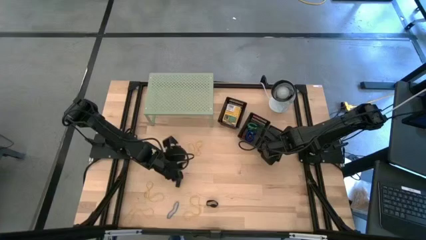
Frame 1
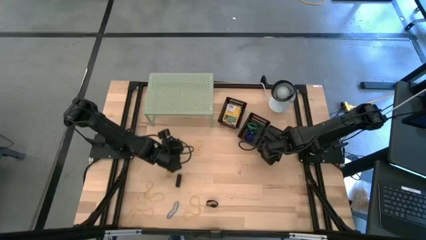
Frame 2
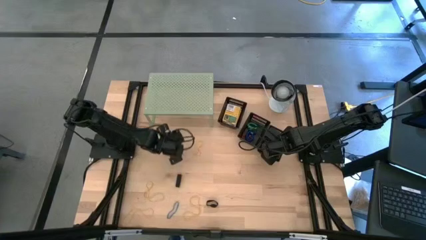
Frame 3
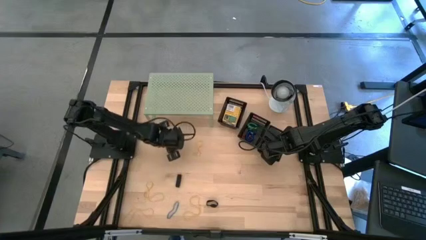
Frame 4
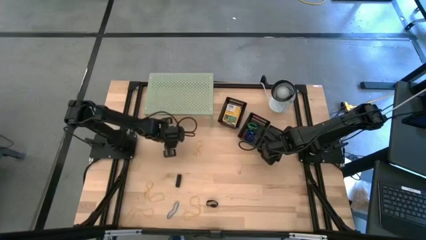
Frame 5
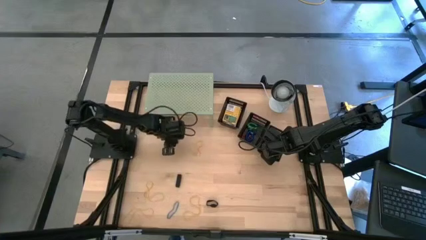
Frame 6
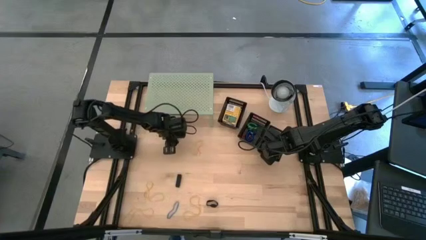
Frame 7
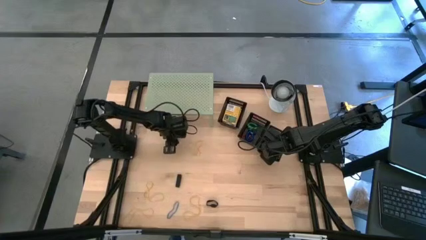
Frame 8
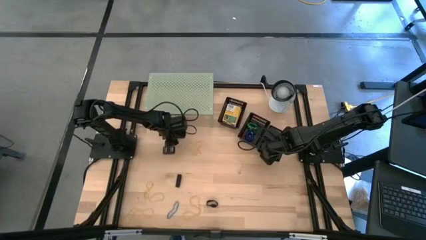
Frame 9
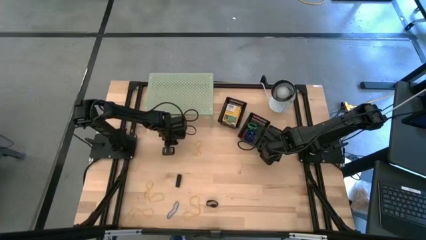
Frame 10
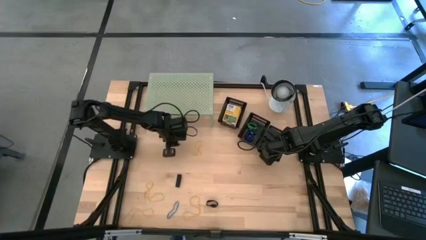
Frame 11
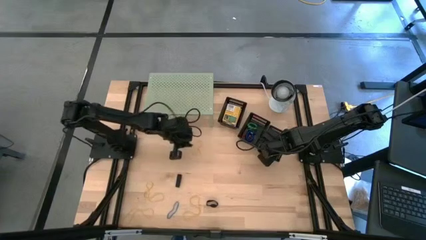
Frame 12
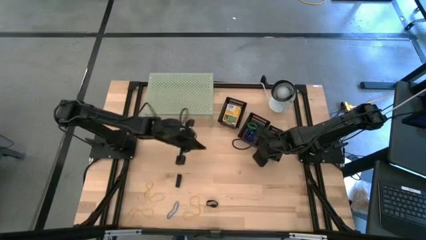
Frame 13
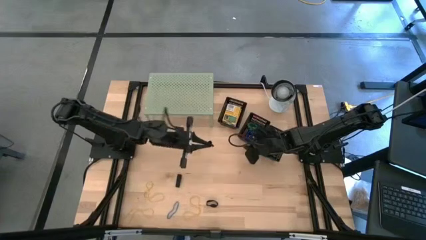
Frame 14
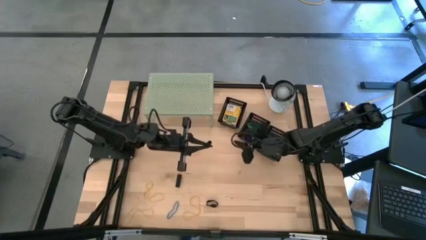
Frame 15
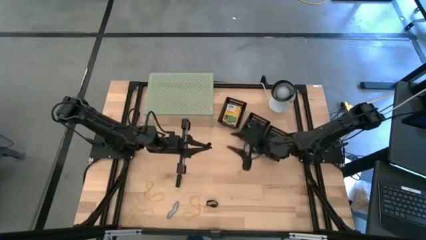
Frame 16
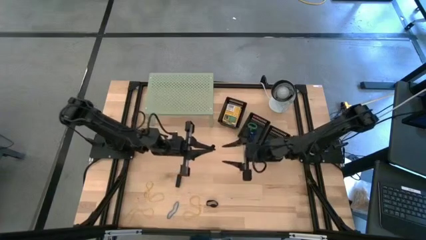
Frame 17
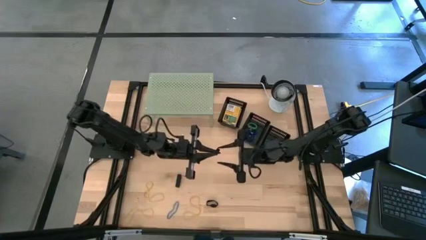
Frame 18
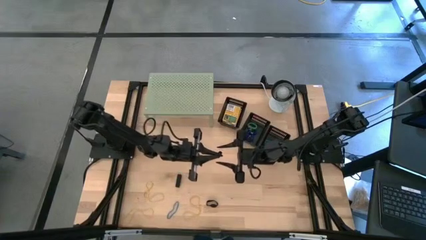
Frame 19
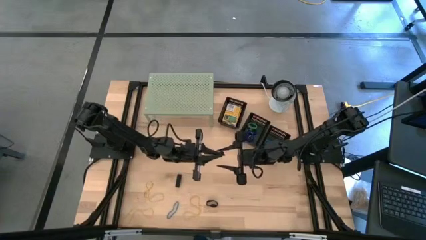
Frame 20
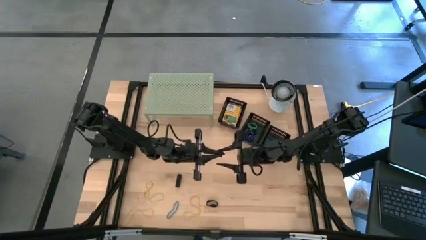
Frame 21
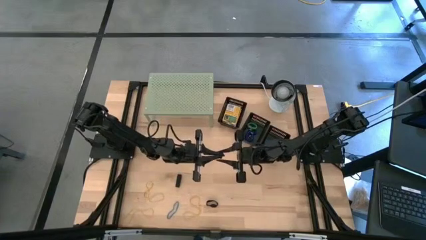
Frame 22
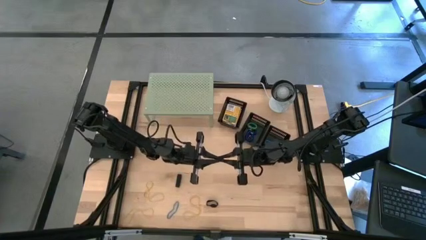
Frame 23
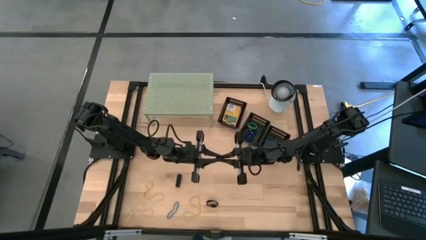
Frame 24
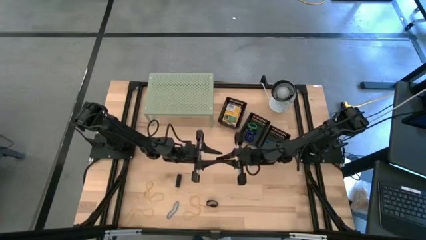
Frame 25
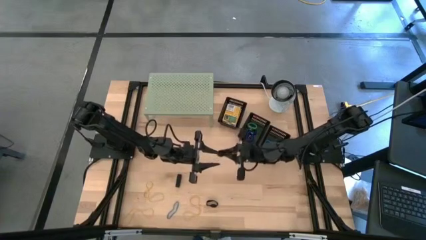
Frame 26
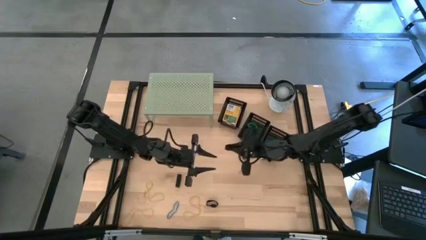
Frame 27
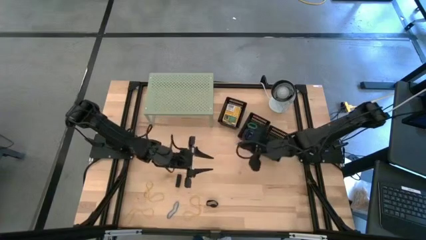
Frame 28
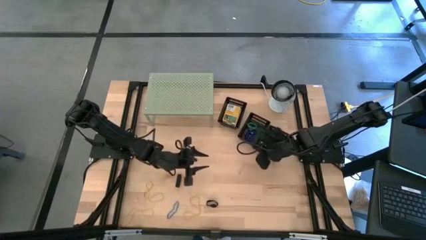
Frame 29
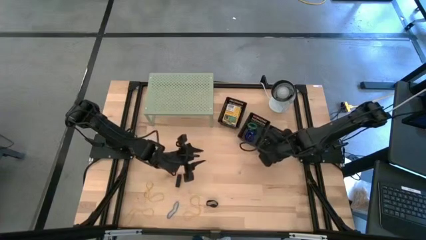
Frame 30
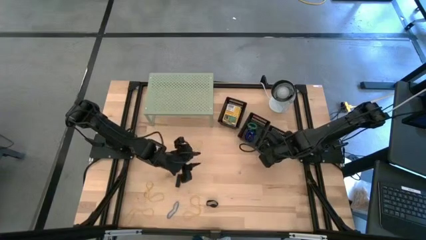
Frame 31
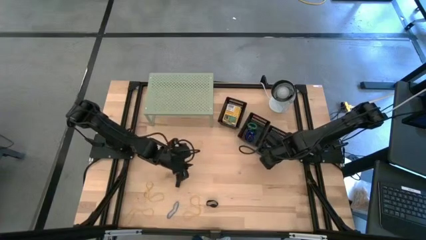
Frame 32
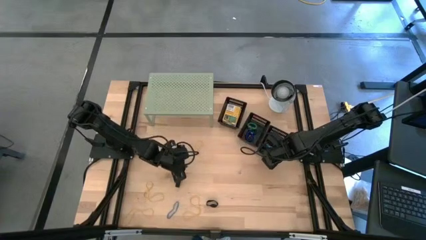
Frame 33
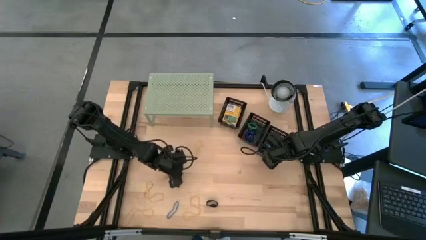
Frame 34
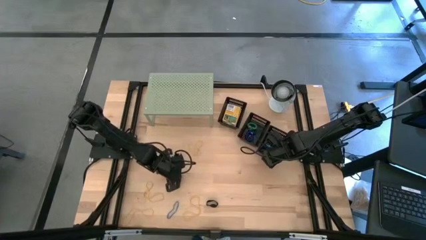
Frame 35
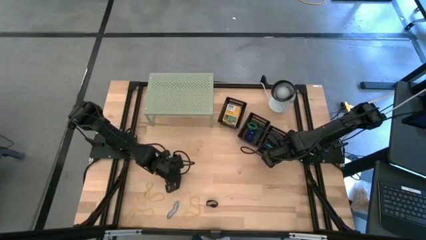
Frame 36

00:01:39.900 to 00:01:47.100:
Task: Pick & Place Office Desk Supplies
Put the black rubber band into the bottom black bin

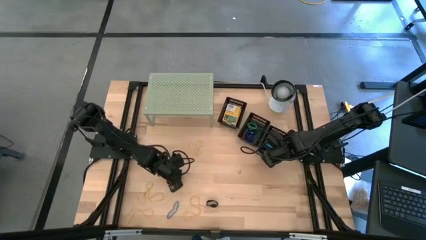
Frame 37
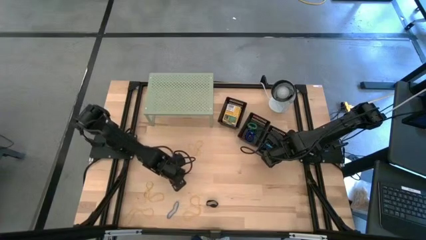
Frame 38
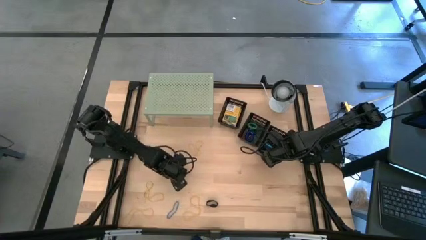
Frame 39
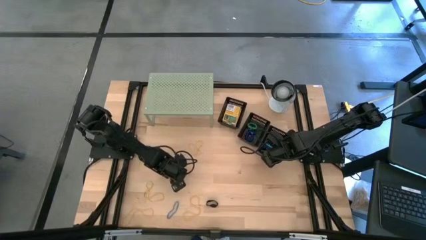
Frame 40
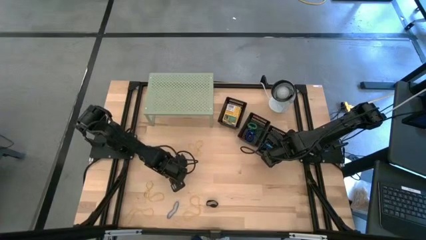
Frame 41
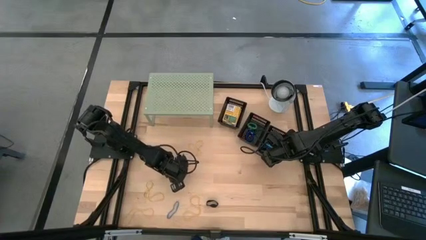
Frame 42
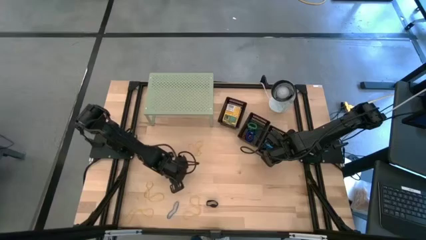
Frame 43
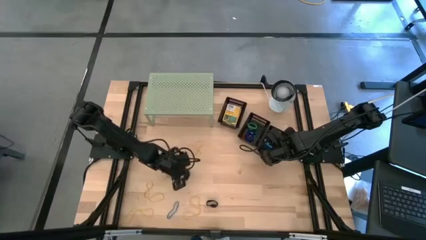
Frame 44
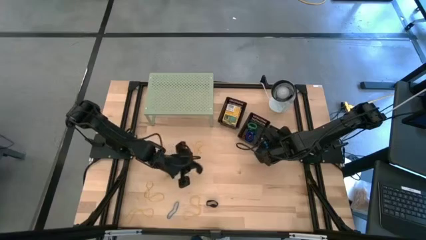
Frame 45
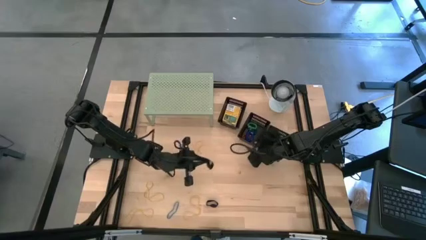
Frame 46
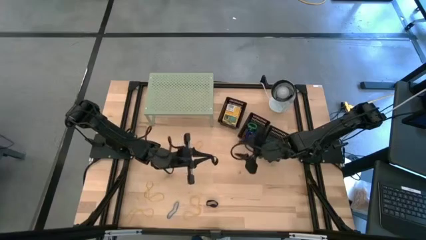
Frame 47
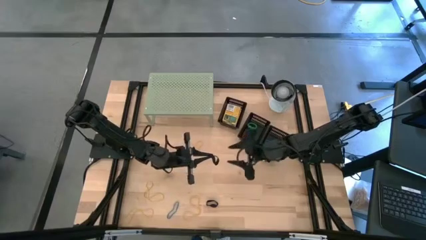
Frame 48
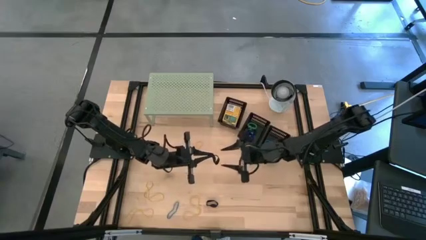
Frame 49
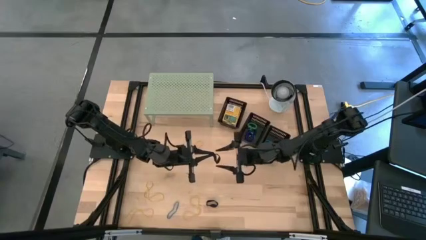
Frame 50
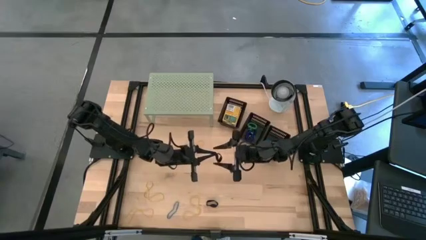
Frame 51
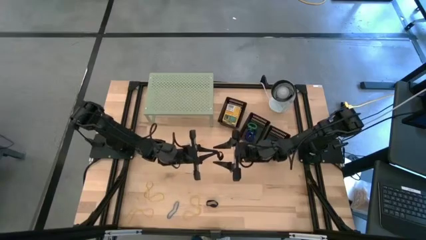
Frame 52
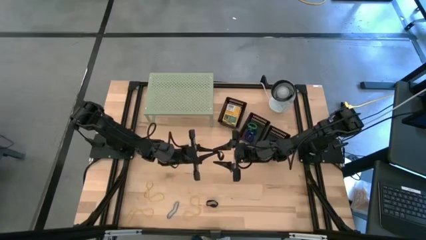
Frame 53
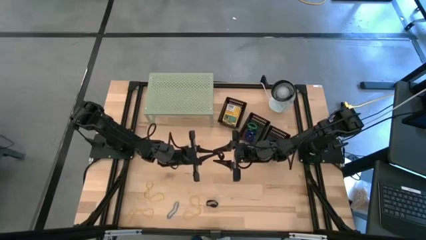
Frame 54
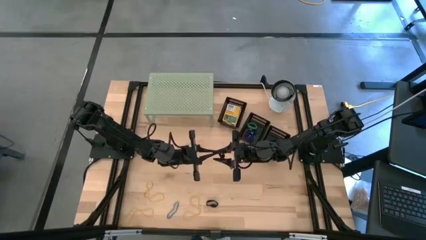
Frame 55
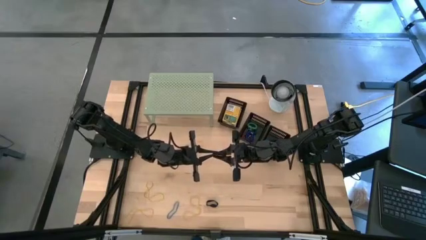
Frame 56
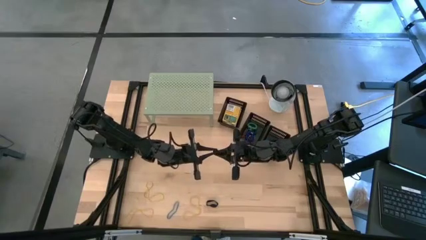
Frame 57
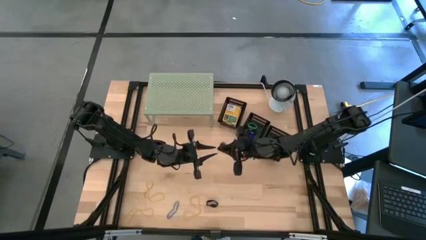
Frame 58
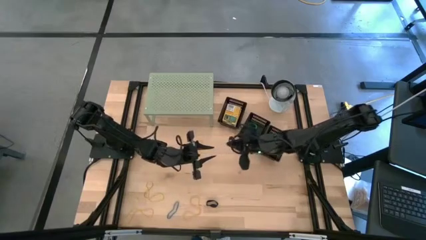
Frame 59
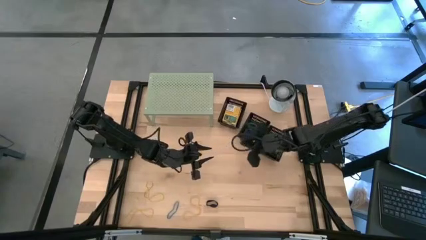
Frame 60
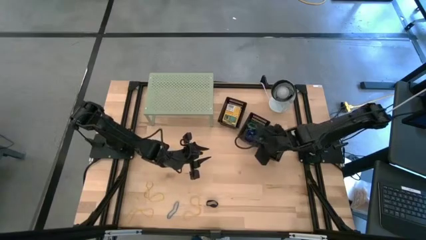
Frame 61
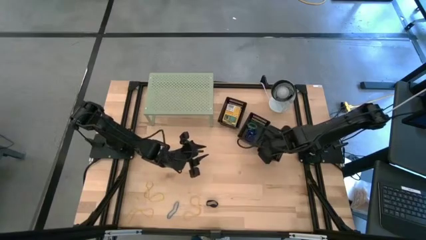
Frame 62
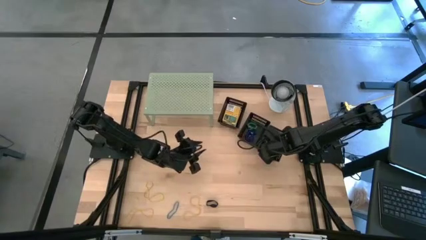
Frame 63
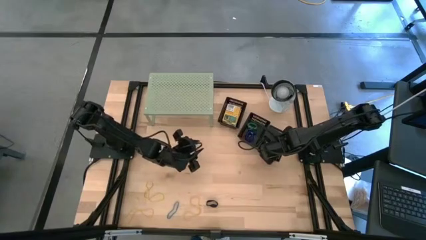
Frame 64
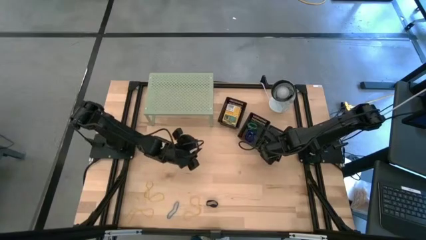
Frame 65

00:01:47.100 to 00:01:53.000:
Put the black rubber band into the bottom black bin
